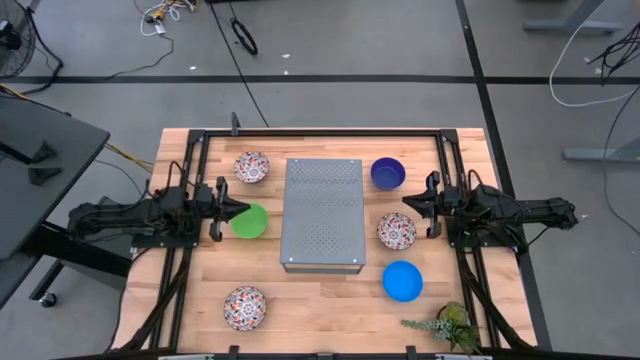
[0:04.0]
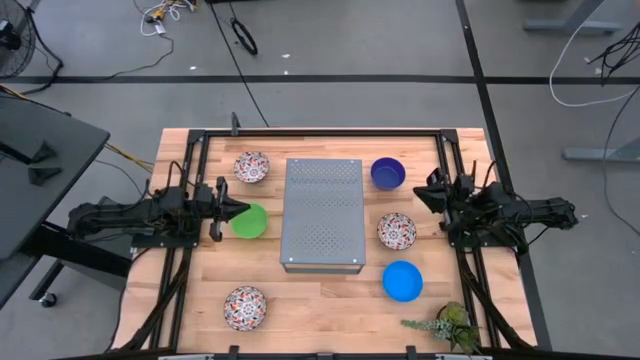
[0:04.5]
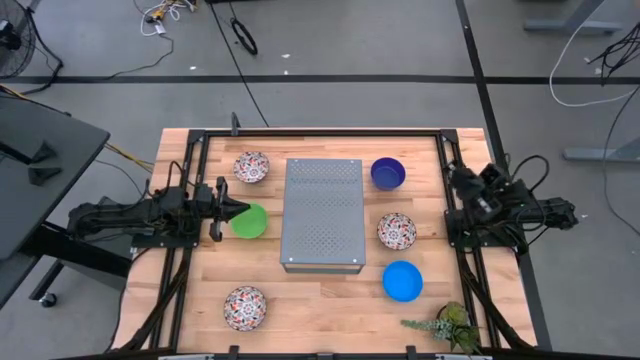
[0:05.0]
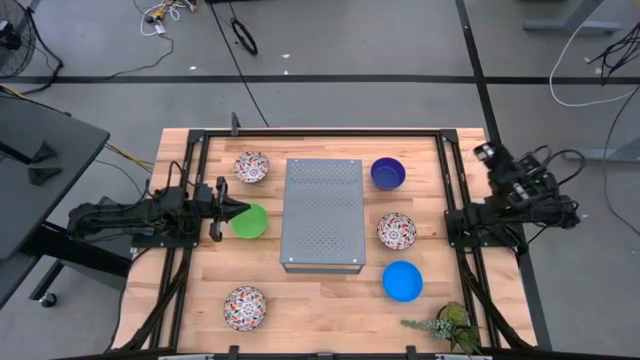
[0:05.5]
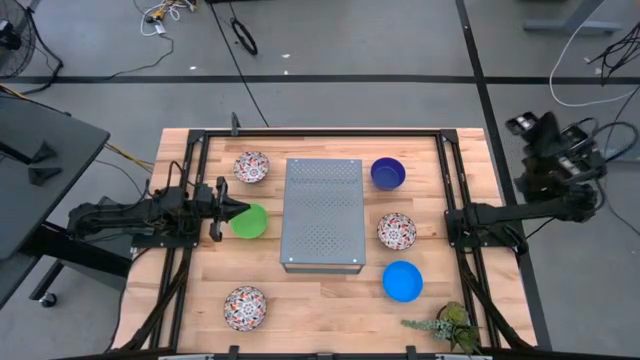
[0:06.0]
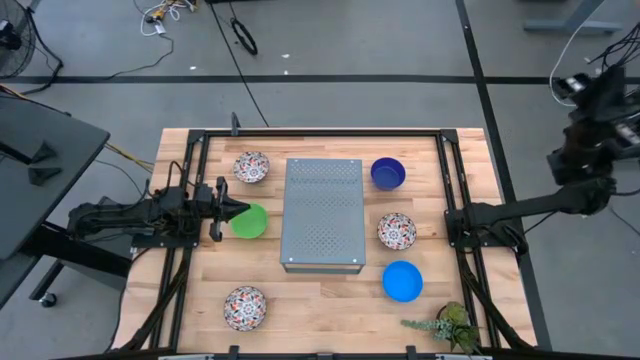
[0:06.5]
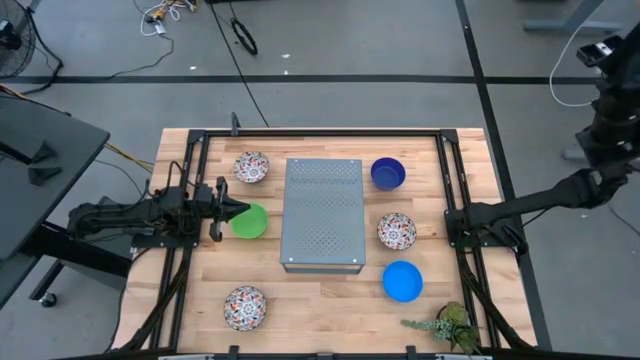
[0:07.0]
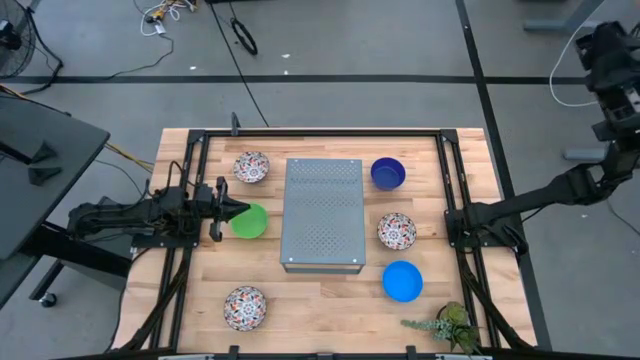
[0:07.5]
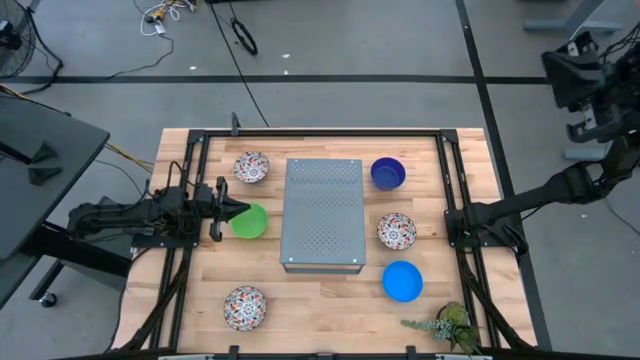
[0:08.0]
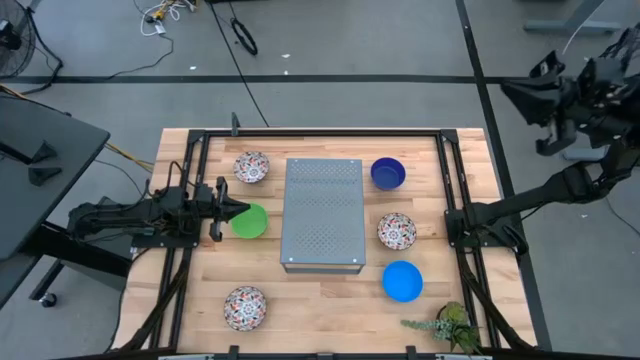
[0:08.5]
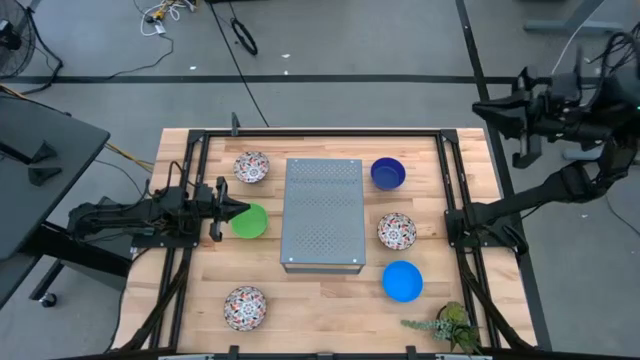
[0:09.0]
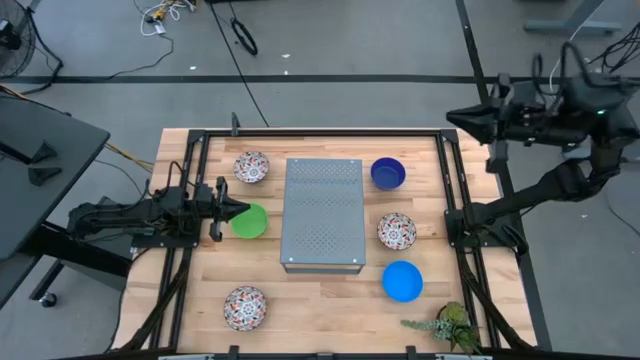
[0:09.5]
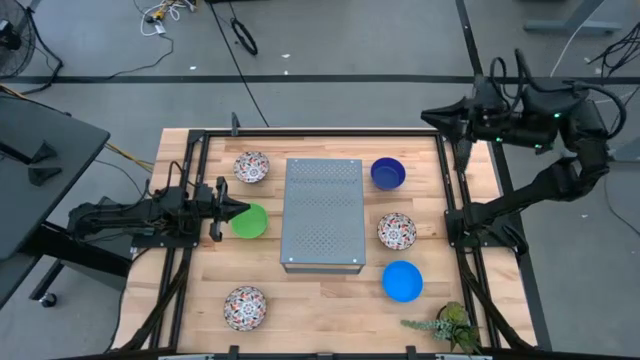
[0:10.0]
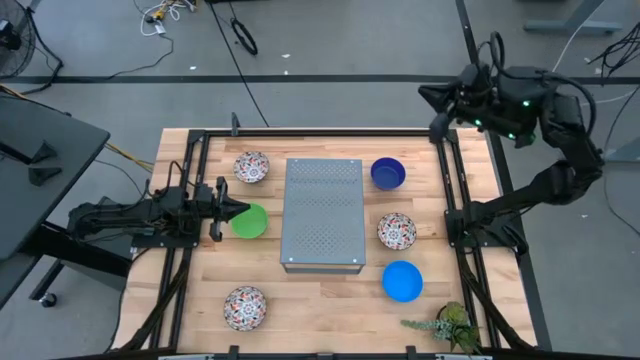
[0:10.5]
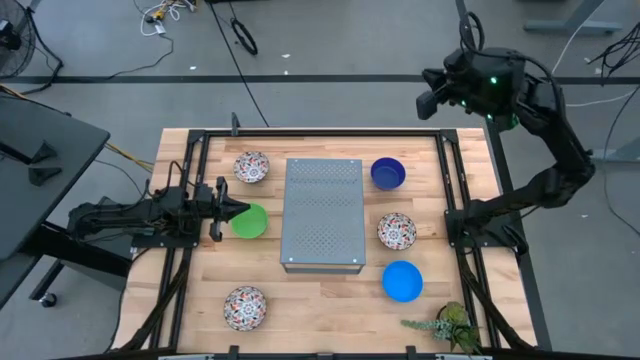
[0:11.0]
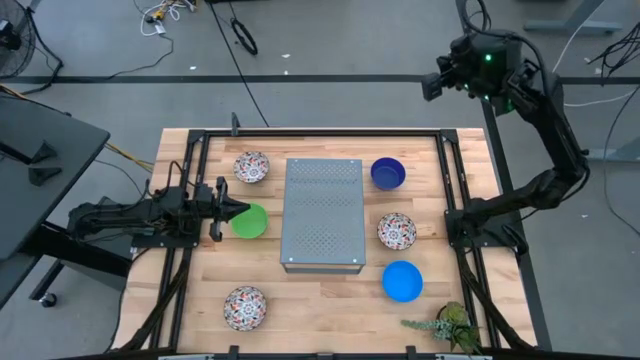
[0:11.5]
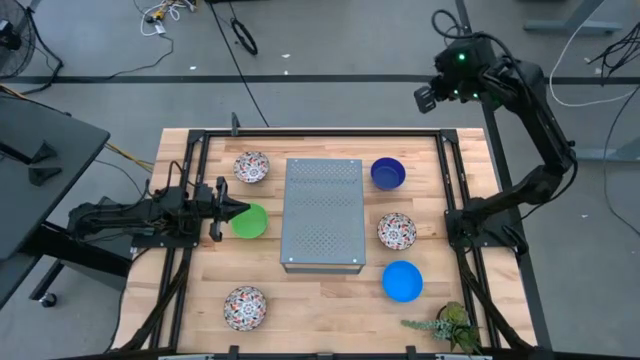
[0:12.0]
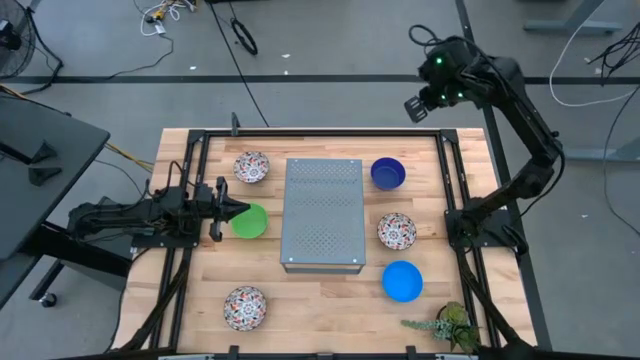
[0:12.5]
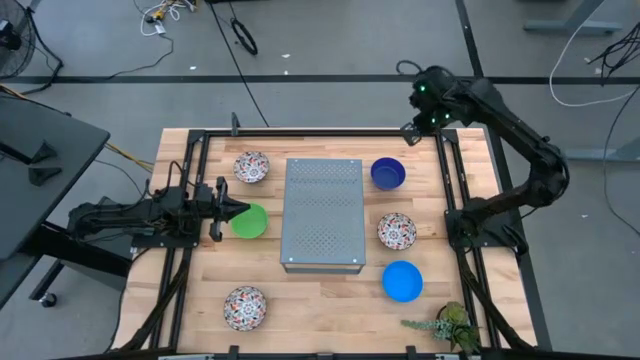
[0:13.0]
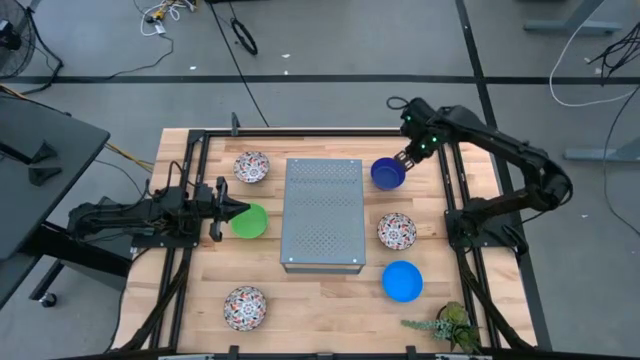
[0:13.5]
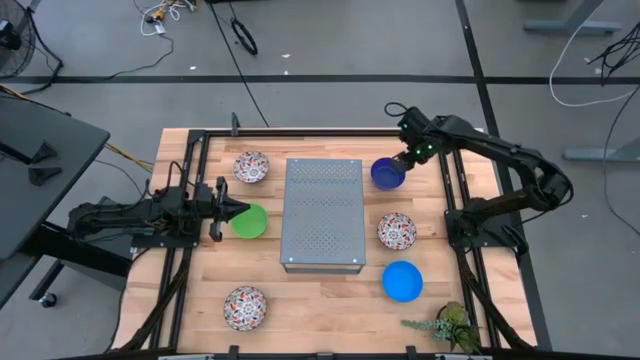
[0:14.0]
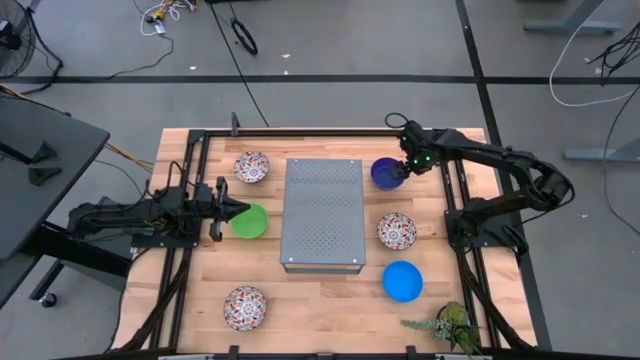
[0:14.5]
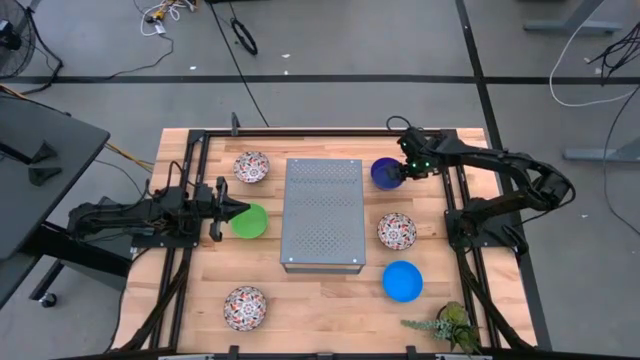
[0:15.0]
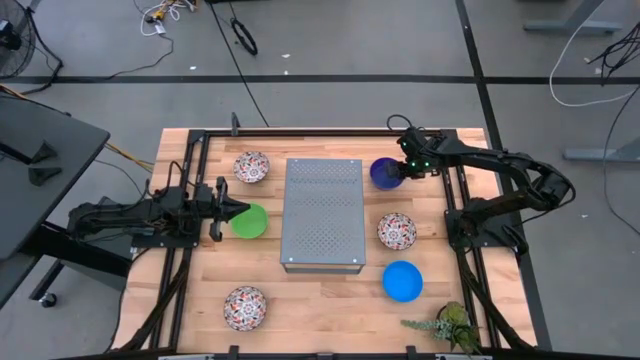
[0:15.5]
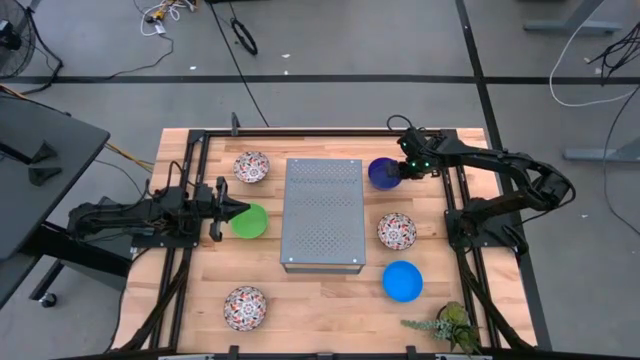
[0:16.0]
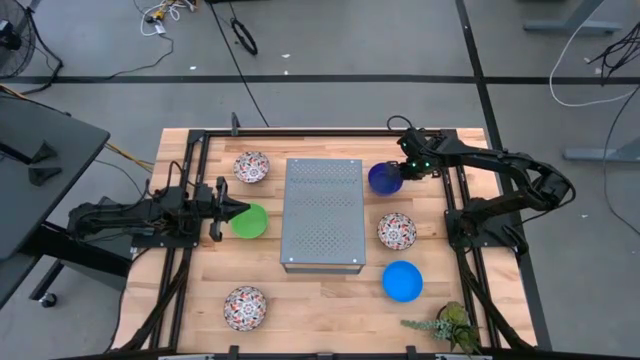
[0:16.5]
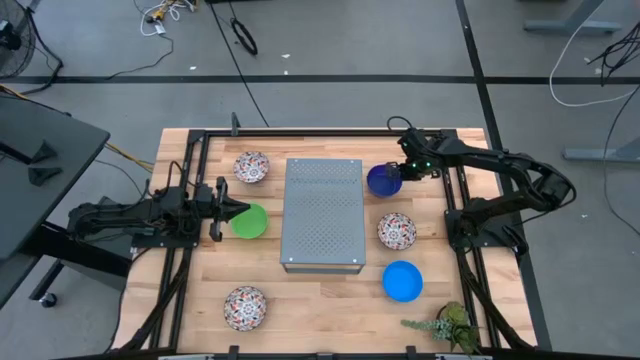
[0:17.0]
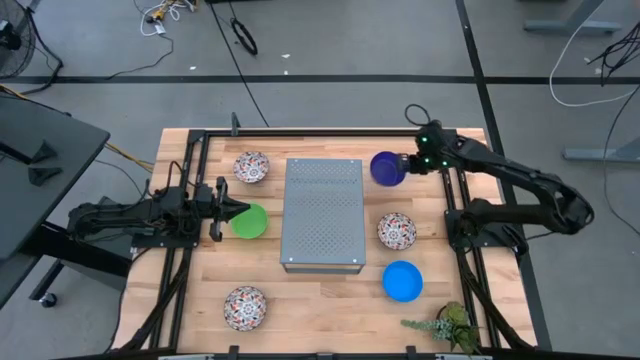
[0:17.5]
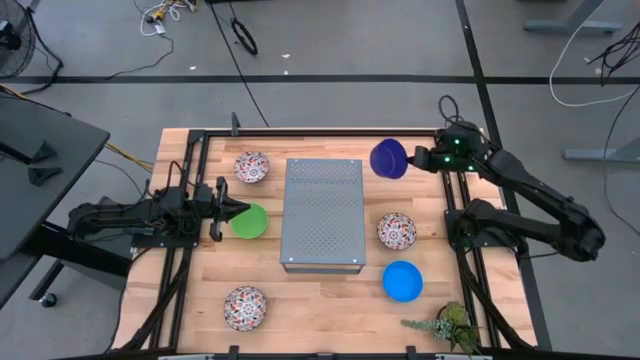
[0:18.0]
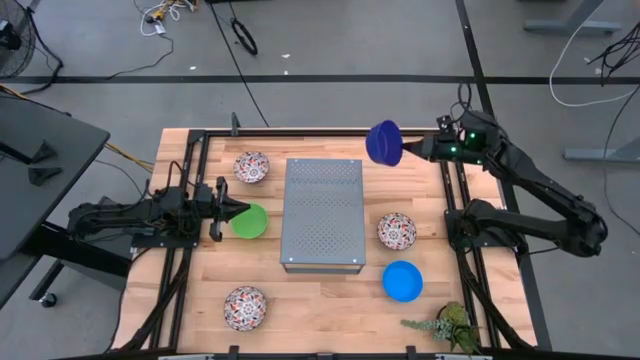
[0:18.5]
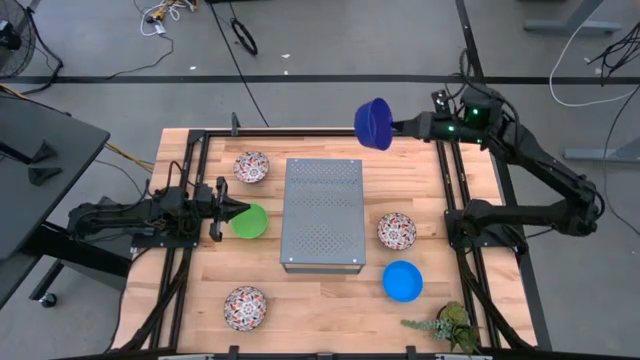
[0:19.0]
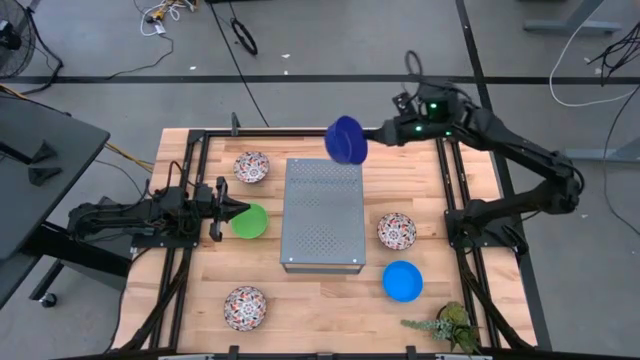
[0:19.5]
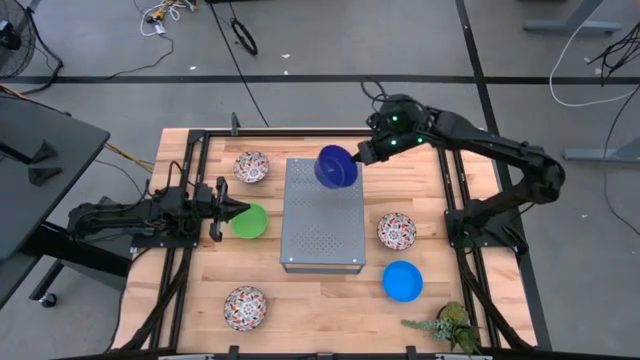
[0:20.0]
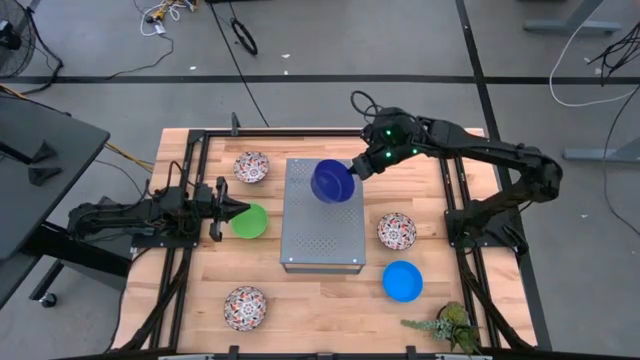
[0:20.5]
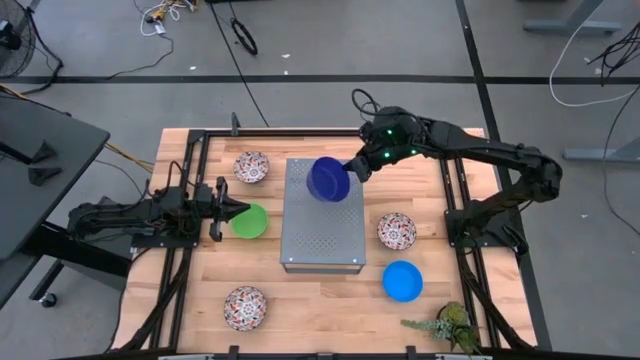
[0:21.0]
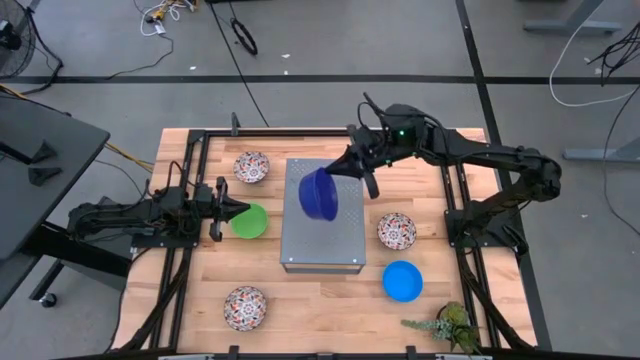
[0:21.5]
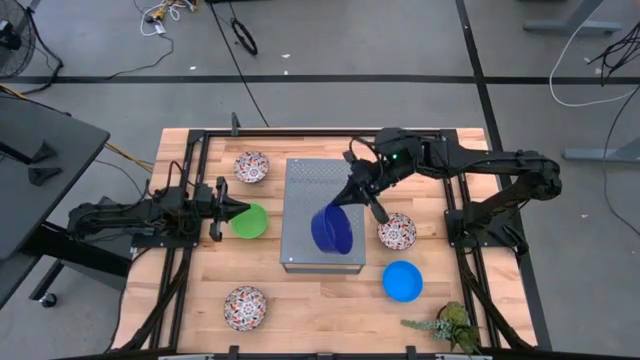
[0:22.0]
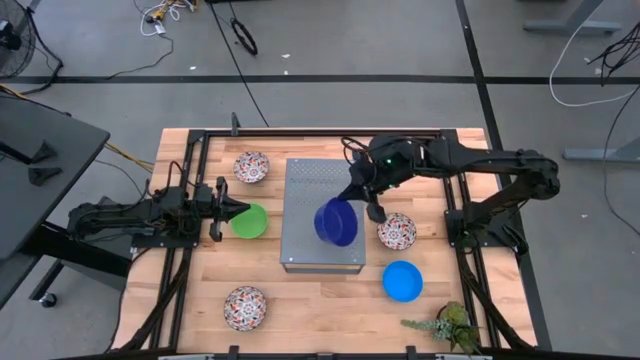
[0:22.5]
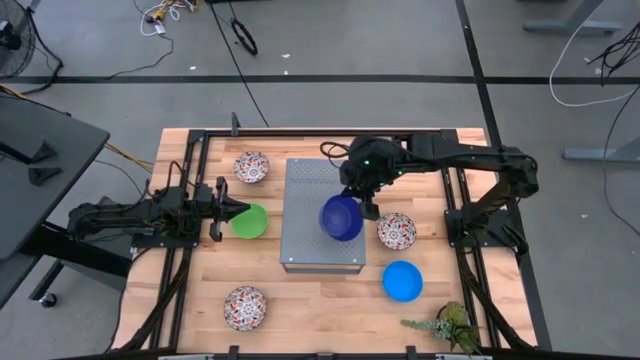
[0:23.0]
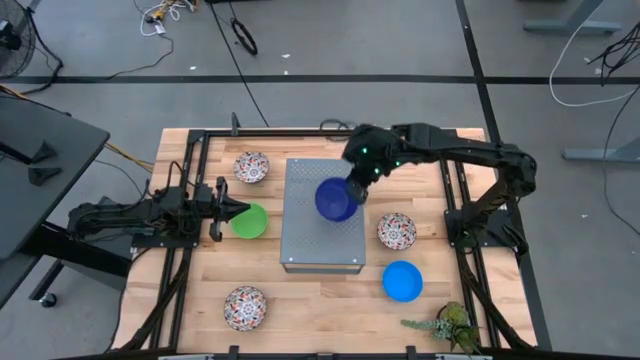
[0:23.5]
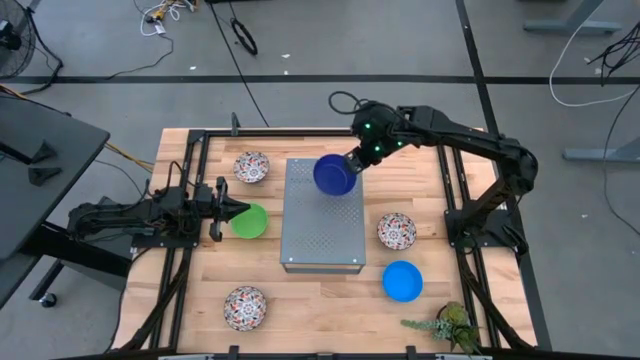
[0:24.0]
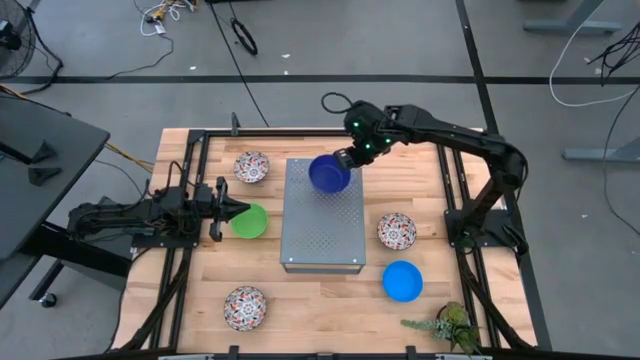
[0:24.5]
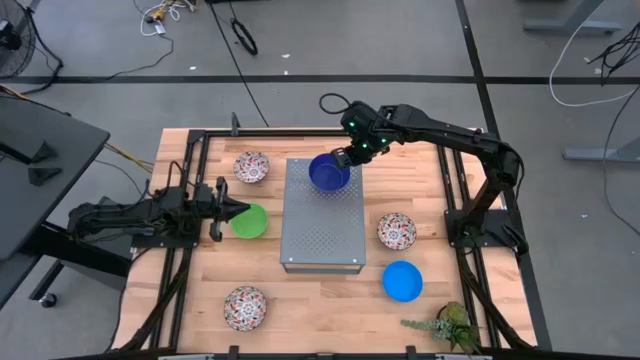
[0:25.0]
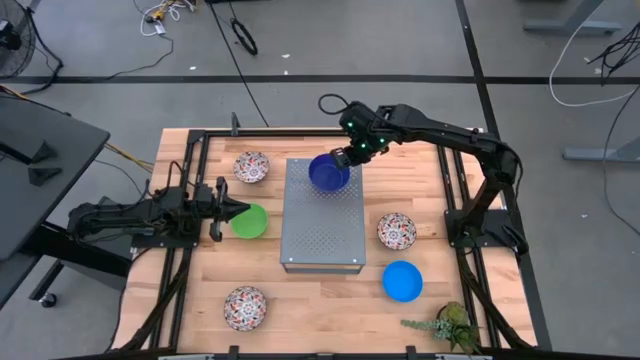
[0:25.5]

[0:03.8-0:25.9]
Task: Pick & Place Mini bowls
Put the dark blue bowl on the shelf
